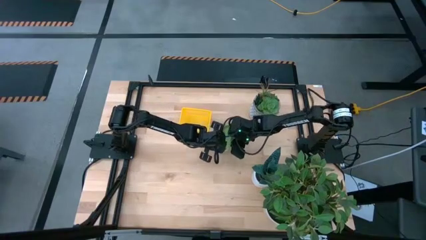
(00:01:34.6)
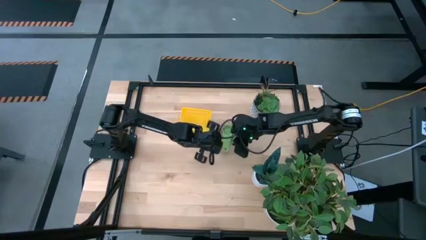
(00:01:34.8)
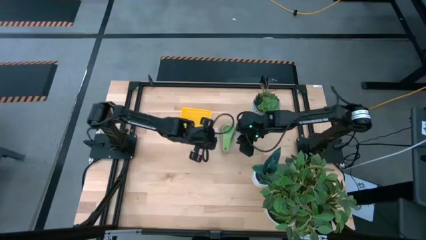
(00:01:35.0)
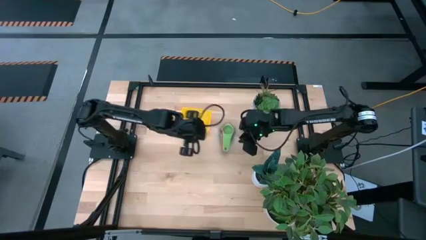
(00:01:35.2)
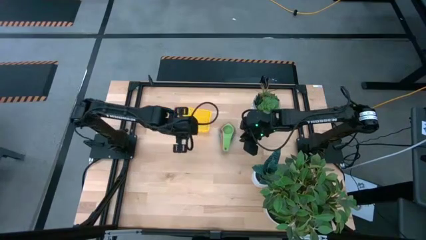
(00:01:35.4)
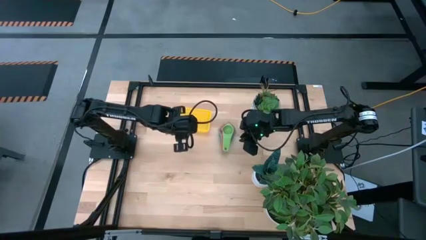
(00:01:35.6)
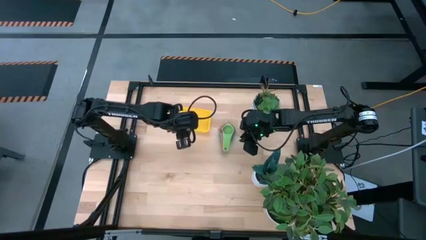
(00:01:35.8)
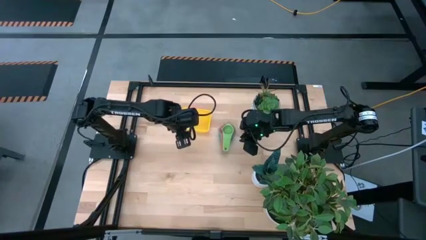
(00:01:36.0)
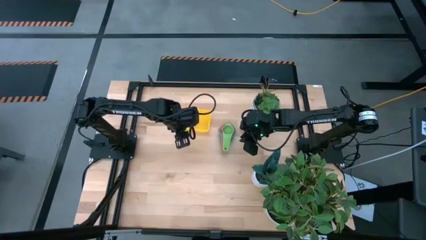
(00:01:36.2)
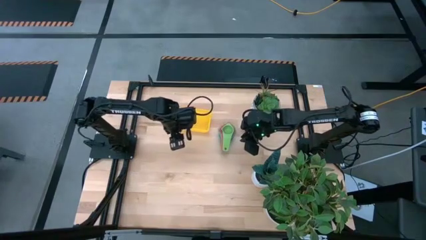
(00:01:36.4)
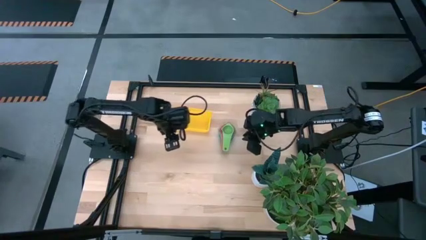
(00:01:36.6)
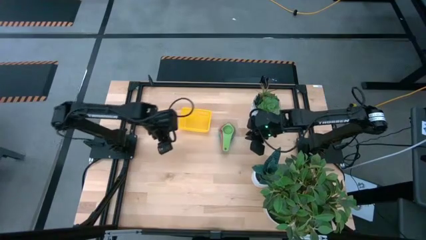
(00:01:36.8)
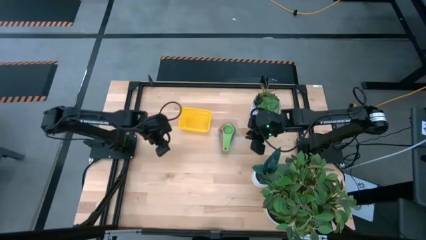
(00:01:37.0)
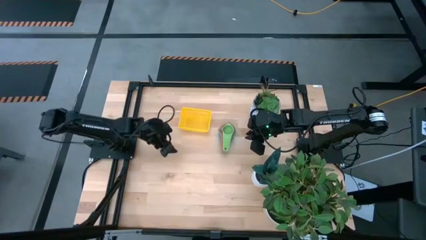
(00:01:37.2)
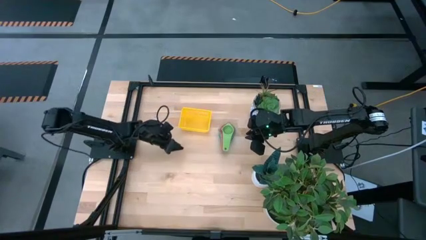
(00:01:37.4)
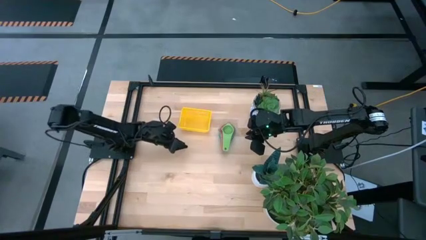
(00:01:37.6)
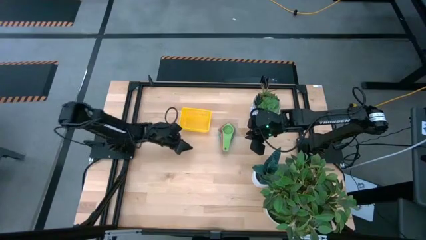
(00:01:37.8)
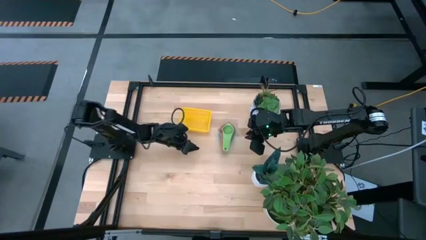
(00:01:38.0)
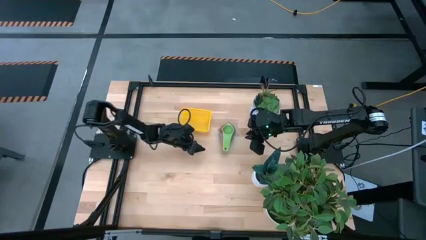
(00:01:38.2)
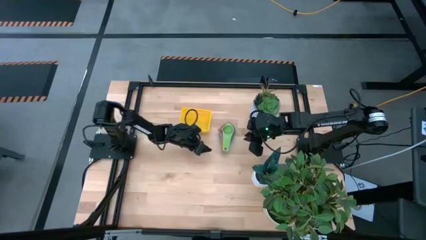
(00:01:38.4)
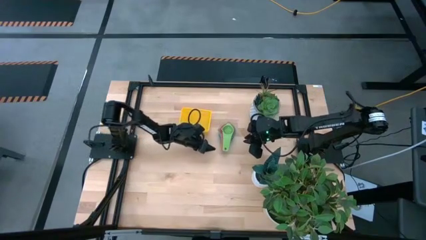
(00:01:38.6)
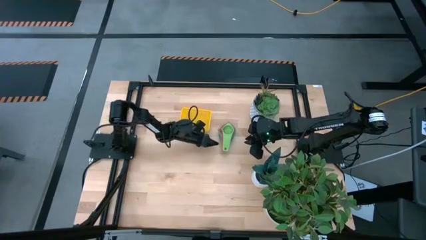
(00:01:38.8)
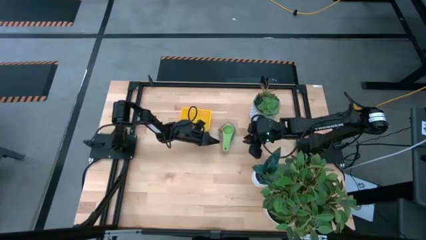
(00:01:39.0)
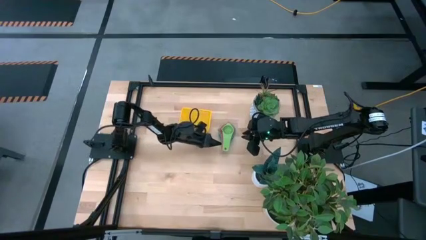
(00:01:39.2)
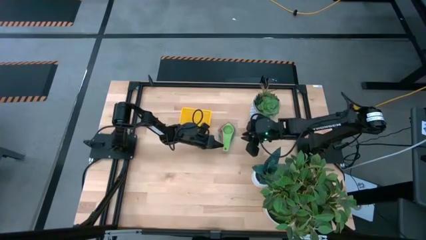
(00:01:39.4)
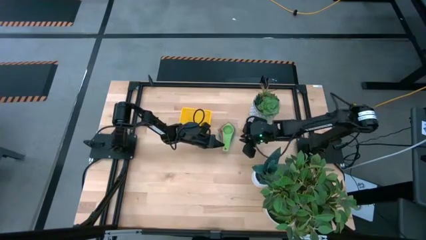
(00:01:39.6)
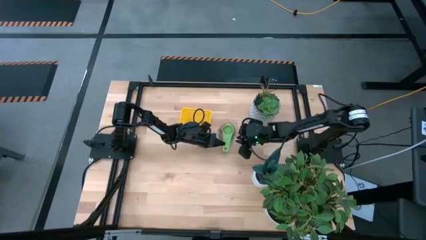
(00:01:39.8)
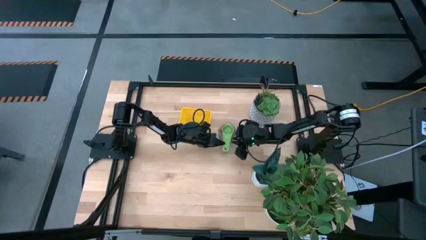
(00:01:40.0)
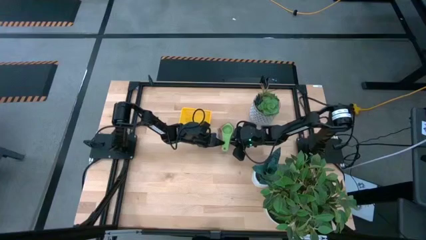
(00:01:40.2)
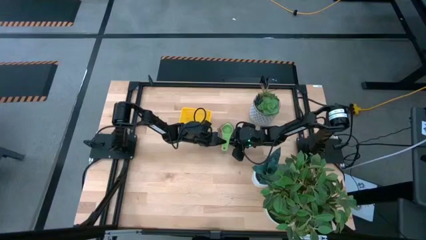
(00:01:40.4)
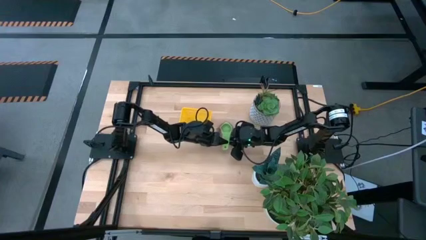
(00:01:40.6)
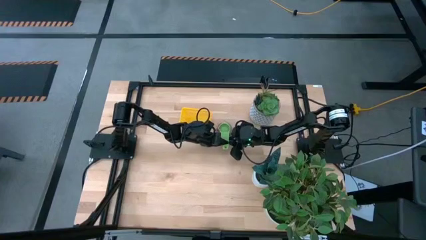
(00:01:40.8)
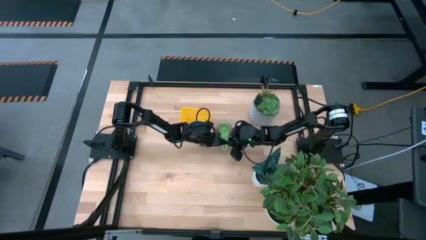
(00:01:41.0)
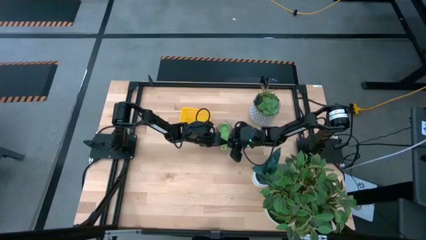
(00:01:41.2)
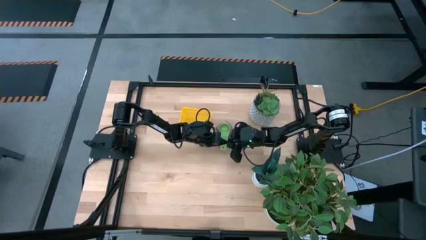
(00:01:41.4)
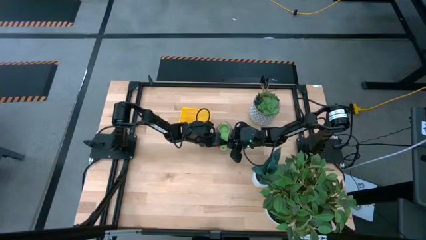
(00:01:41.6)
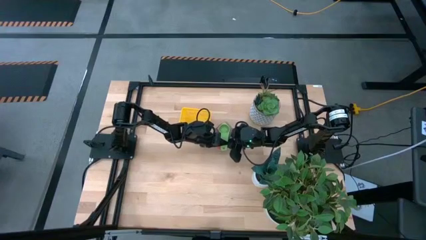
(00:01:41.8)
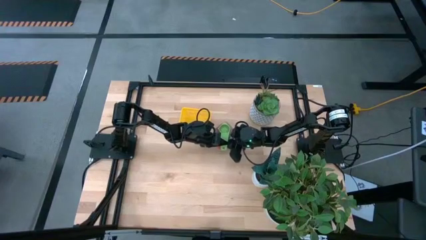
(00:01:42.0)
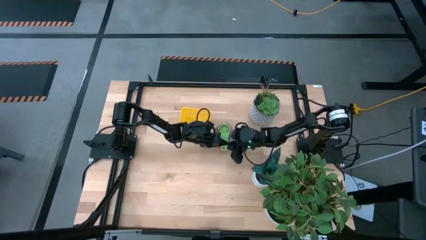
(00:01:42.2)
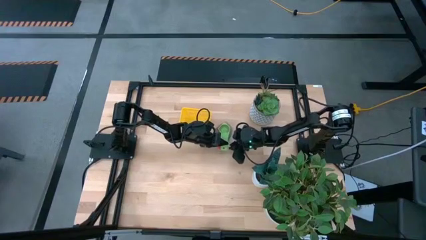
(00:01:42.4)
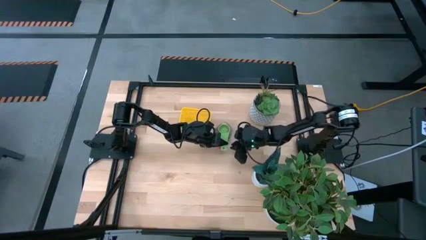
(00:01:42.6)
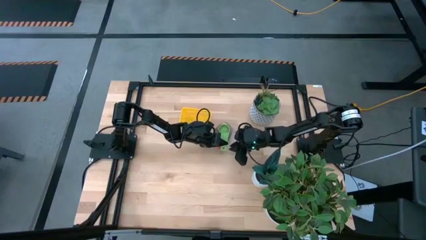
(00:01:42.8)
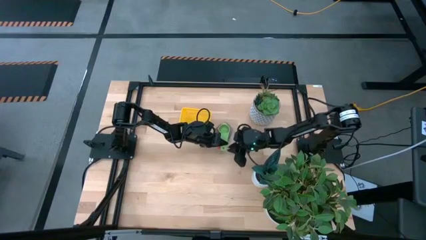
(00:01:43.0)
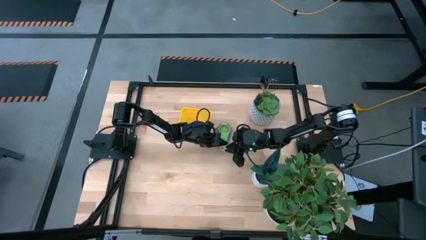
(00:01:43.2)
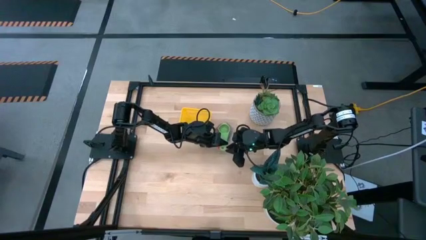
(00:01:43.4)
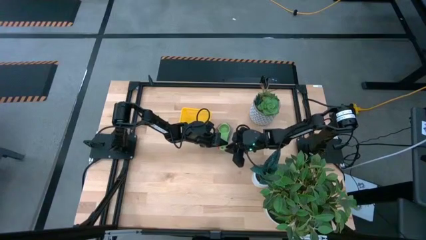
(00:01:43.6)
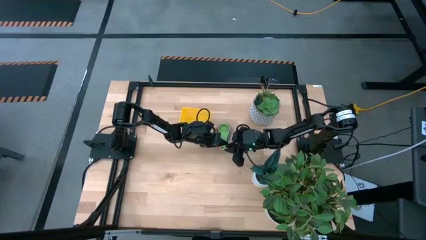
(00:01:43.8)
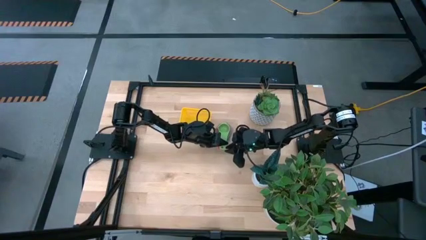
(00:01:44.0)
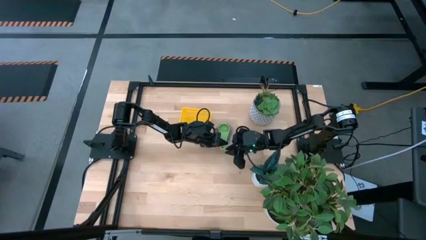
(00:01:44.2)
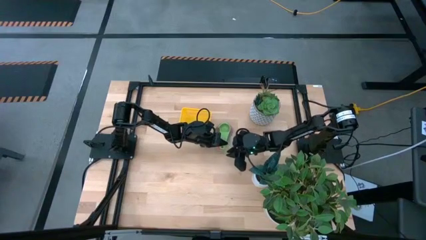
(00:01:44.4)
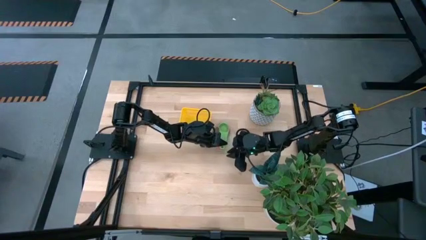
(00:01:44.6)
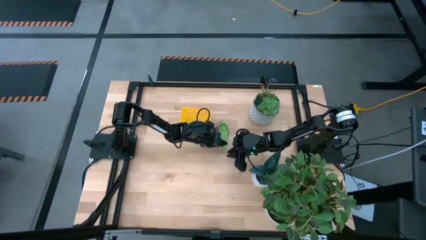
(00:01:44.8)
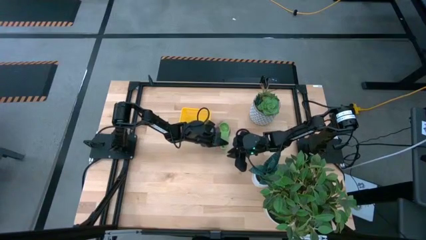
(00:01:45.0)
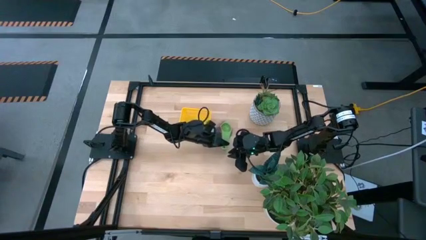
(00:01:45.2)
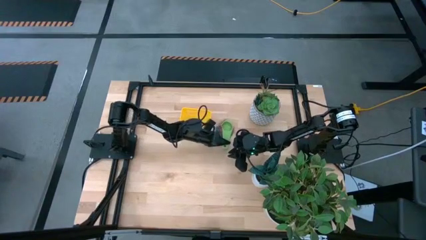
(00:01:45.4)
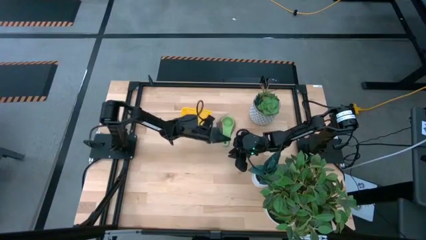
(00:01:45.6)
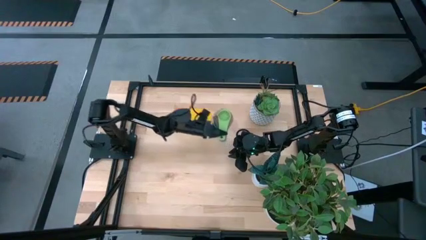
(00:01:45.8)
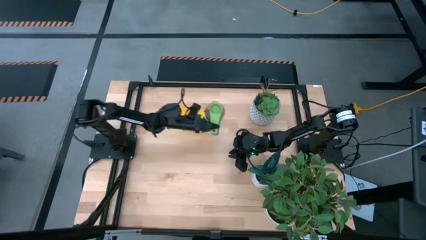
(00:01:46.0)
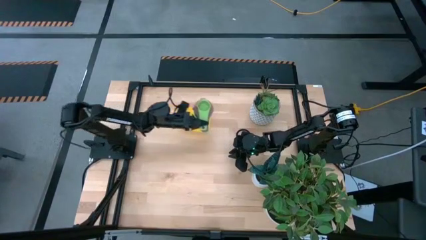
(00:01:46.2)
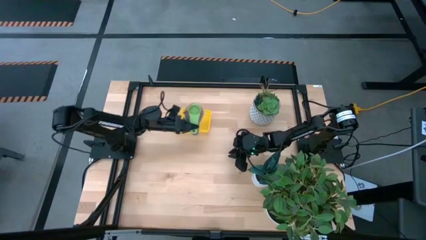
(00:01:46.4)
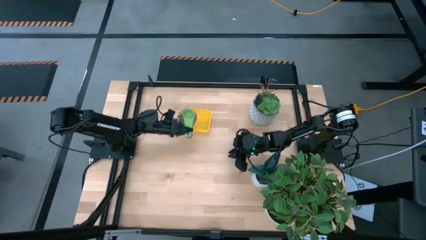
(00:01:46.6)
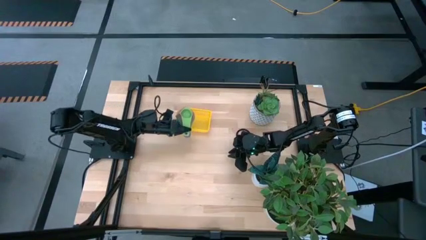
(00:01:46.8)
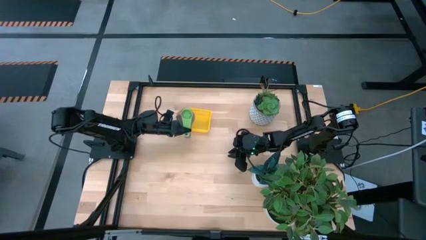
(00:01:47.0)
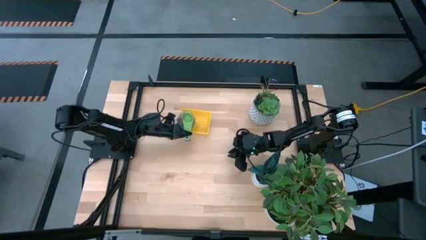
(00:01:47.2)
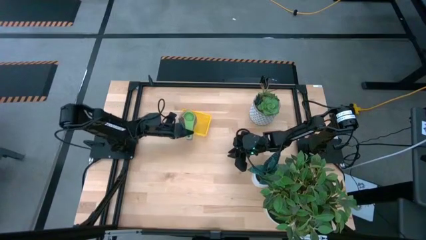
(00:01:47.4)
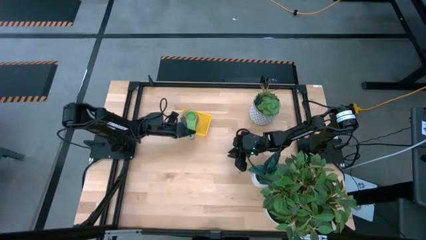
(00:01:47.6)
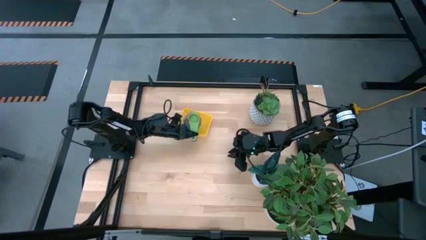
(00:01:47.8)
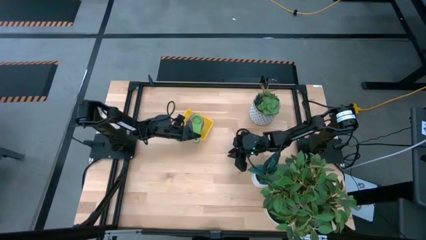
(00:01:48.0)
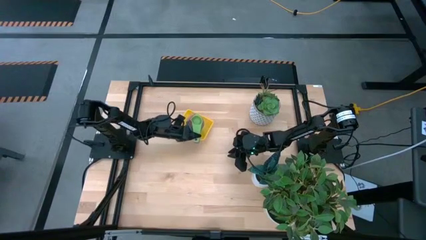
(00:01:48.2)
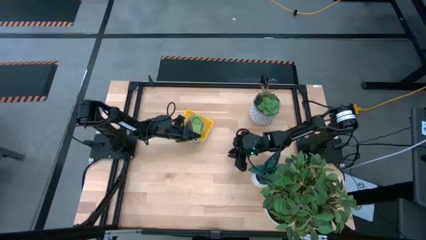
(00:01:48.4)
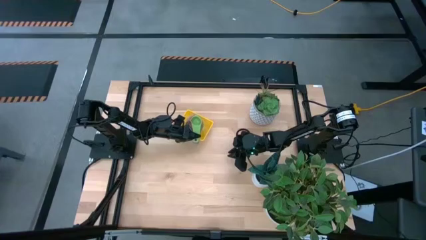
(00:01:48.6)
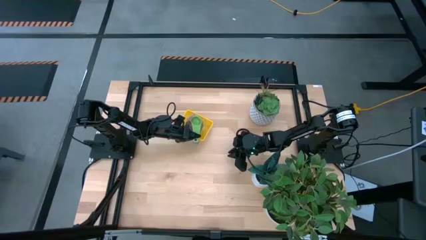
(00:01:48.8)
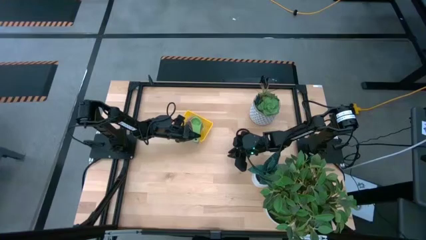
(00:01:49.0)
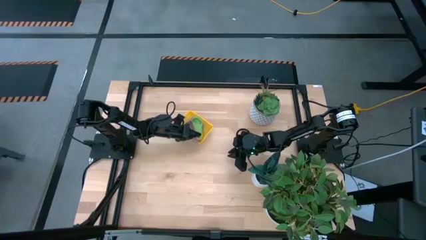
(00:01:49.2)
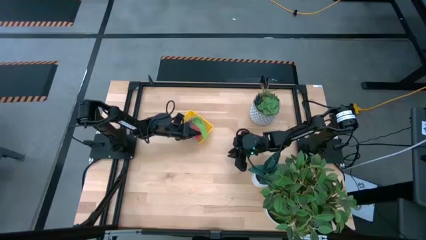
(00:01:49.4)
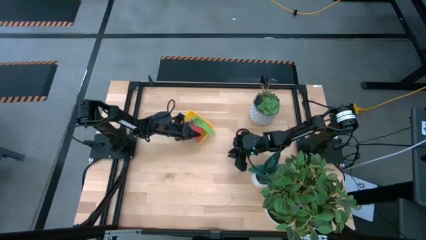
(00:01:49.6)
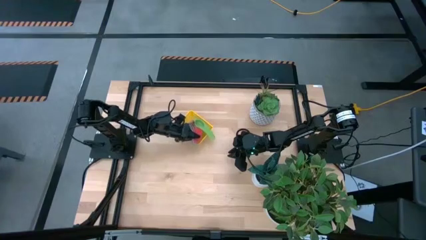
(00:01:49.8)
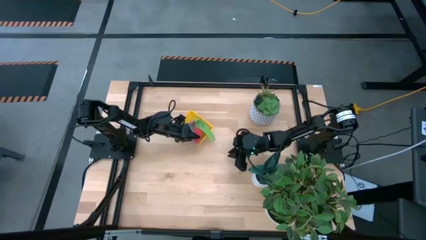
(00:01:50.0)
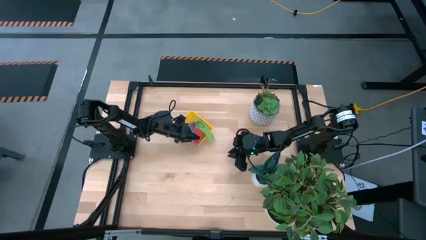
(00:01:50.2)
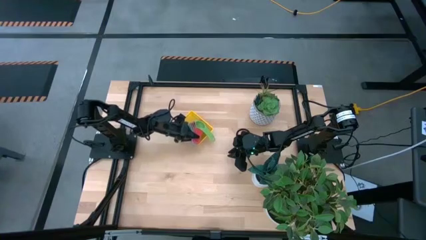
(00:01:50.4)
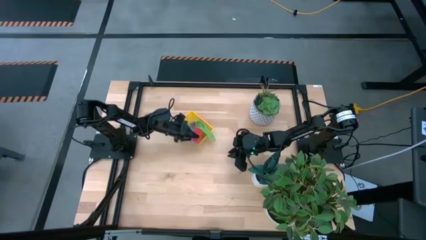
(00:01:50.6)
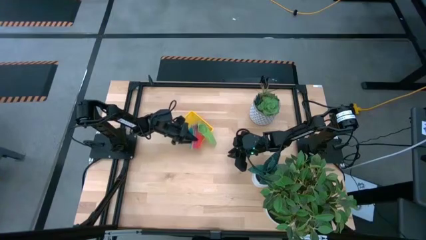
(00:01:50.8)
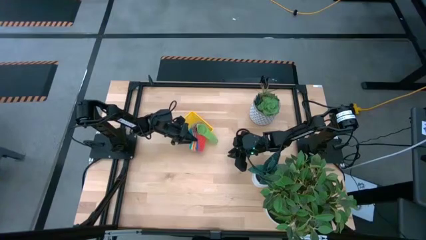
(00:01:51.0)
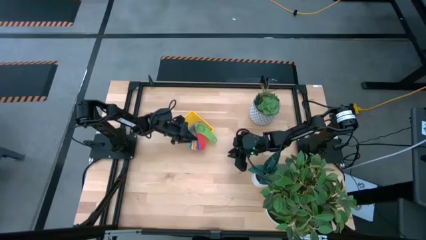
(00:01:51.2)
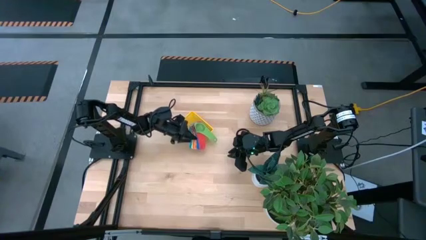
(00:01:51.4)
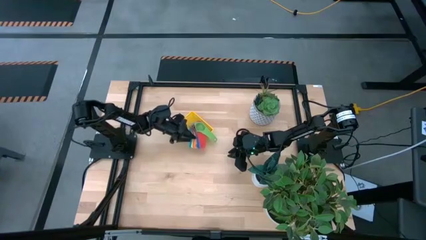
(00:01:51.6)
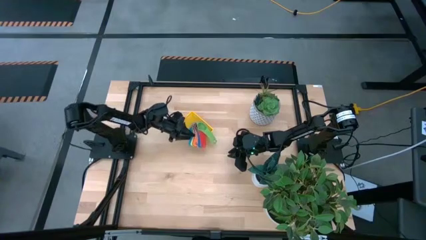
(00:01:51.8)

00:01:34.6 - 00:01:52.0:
Task: Nest measuring cups in basket
Put the stacked measuring cups into the yellow bin
